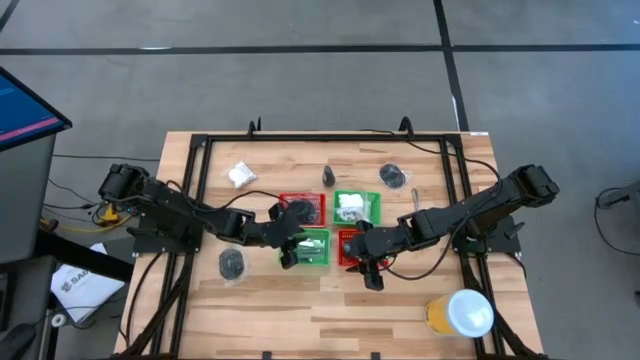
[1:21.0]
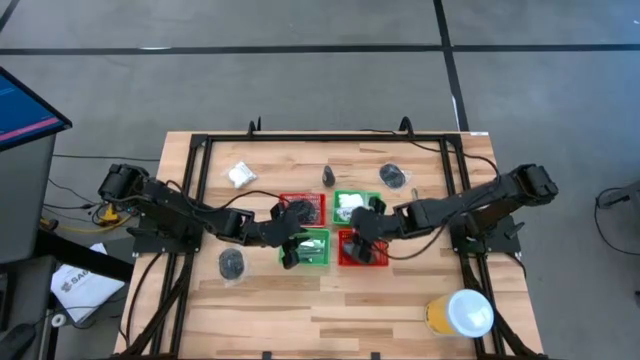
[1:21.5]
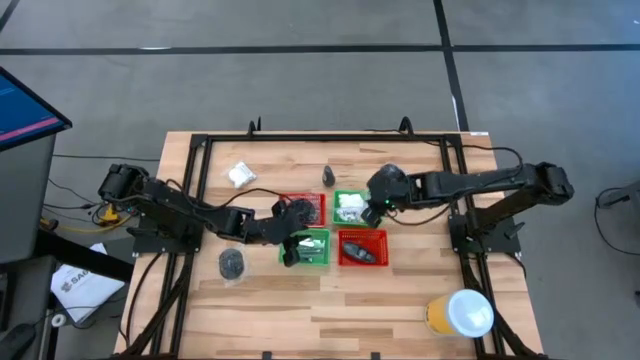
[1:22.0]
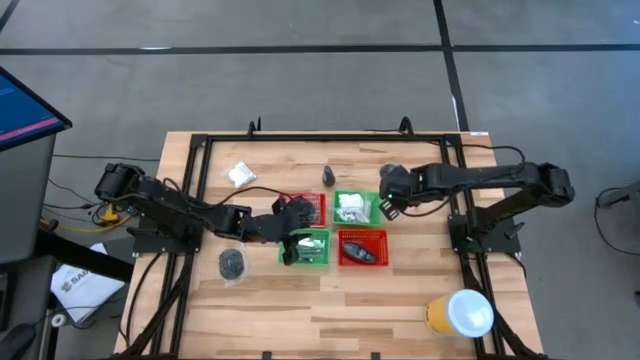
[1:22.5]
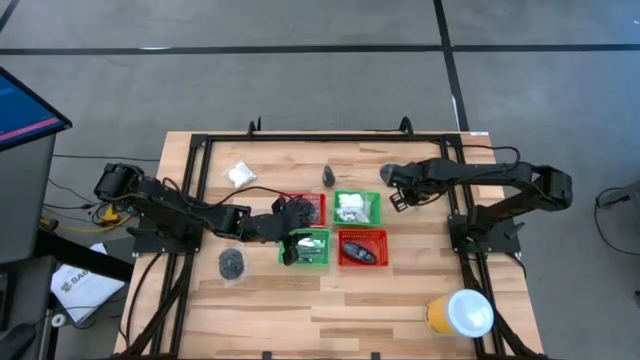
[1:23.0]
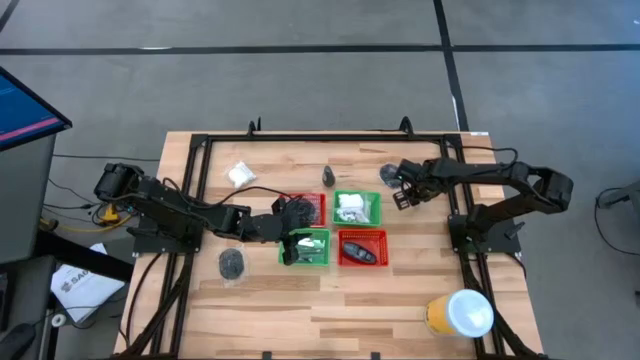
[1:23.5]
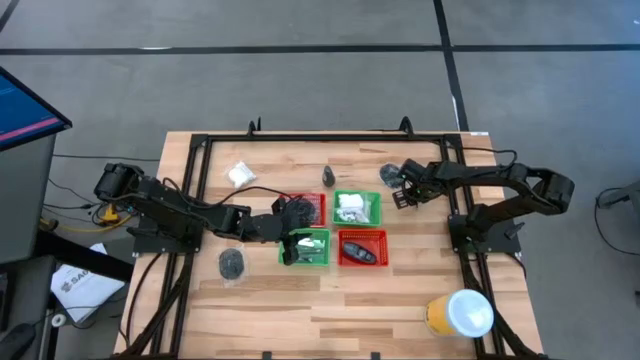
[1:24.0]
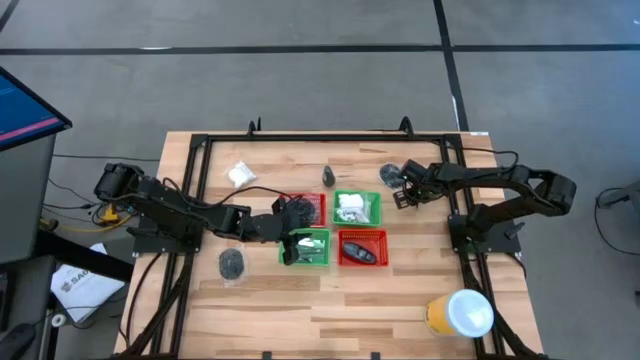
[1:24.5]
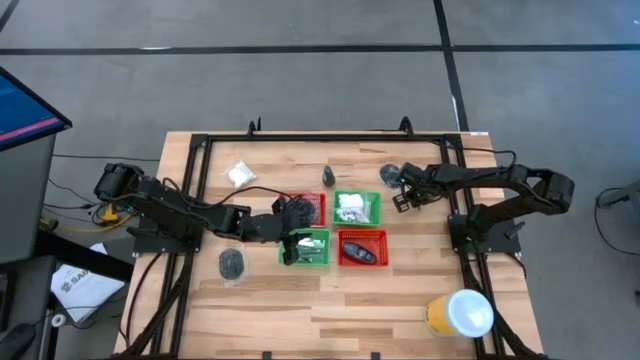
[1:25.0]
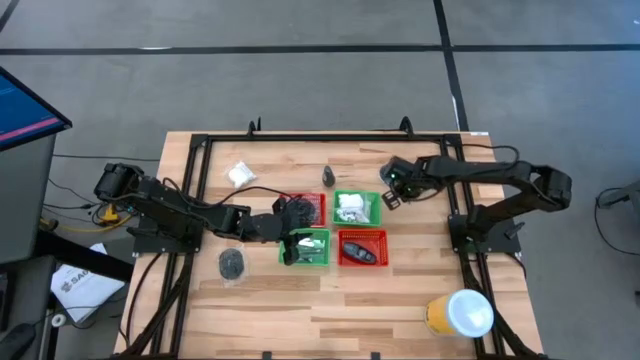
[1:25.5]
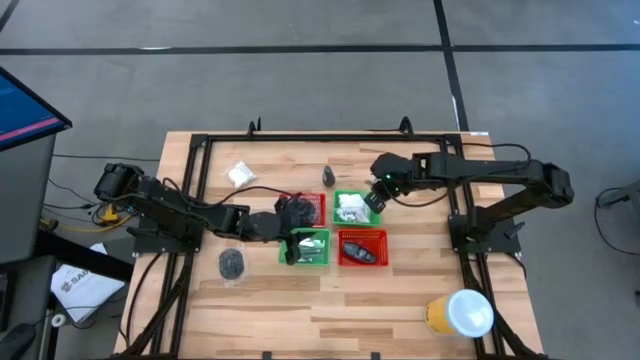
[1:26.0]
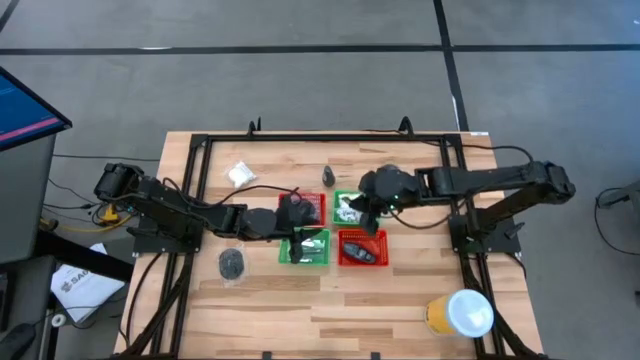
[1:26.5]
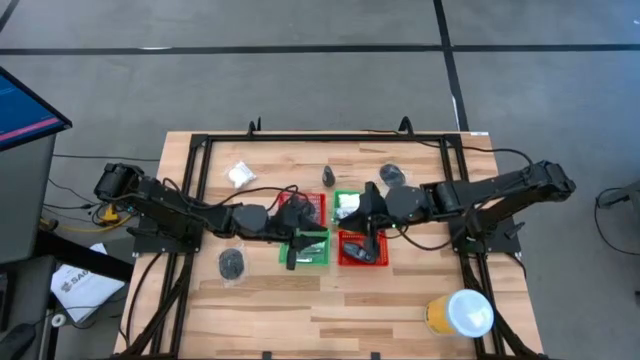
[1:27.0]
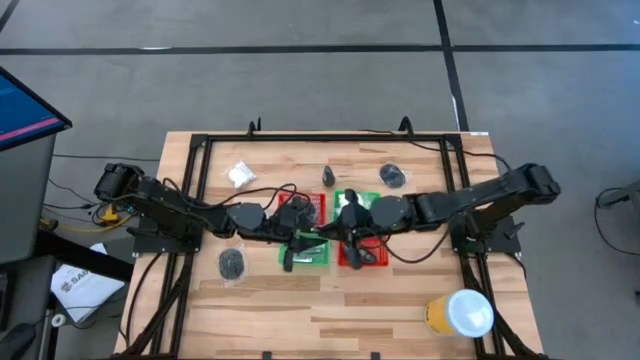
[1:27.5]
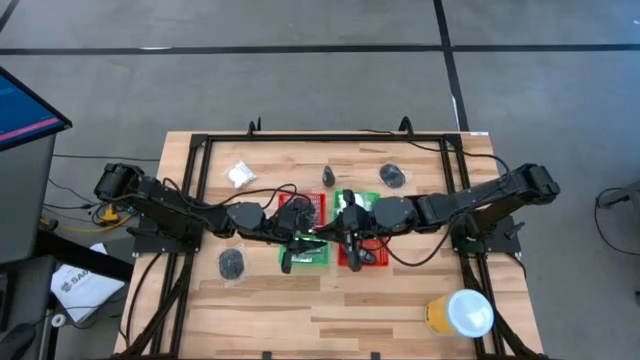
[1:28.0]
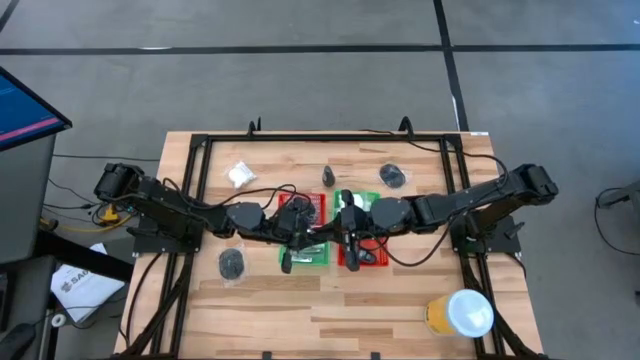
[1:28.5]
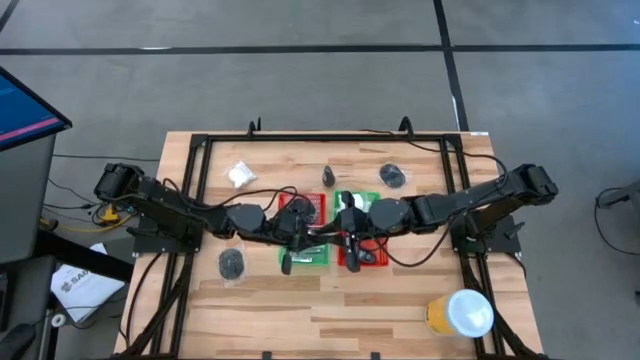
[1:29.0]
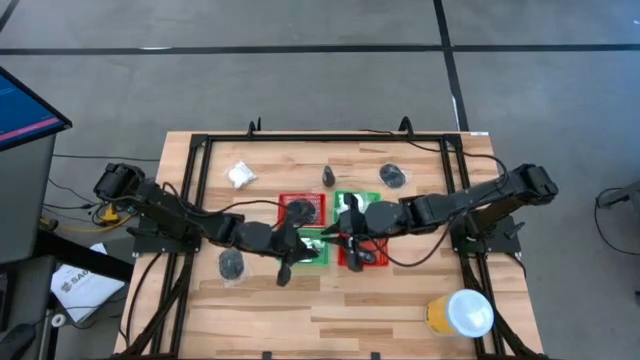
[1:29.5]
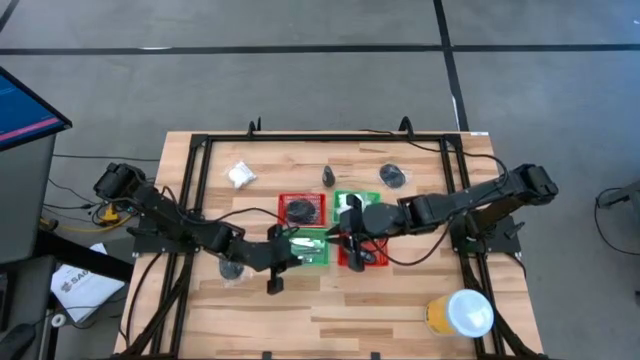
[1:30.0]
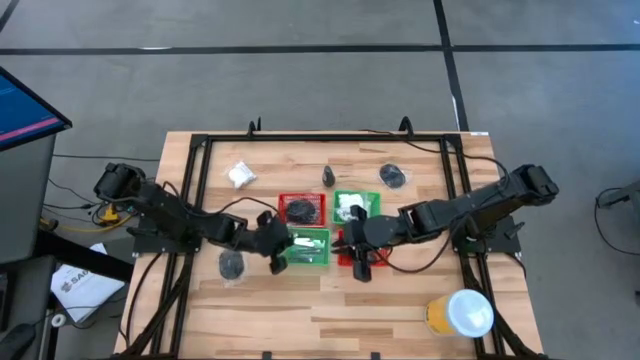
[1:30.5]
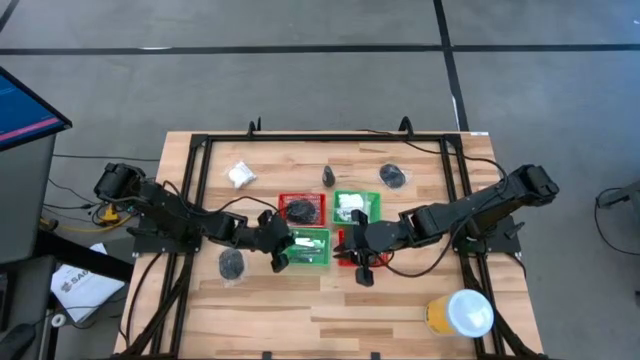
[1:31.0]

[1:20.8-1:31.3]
Task: Pick & Place Travel size toiletries
Put the silver nail cutter into the left green basket

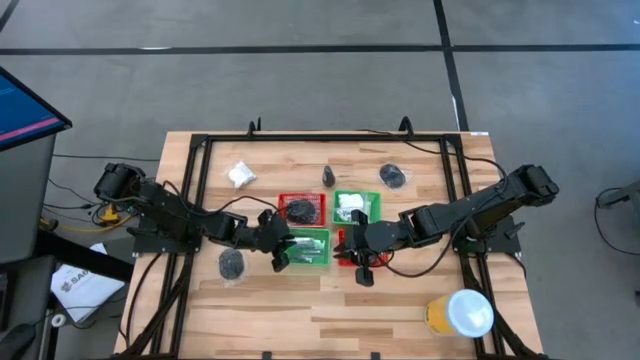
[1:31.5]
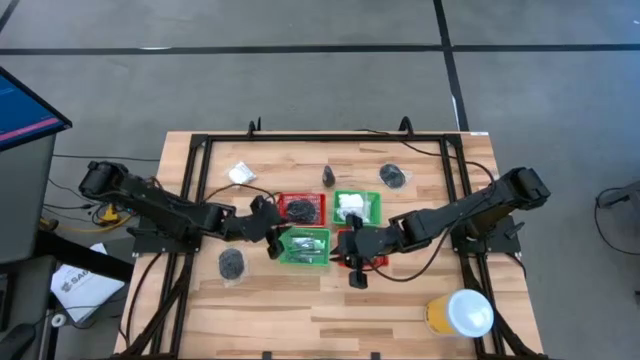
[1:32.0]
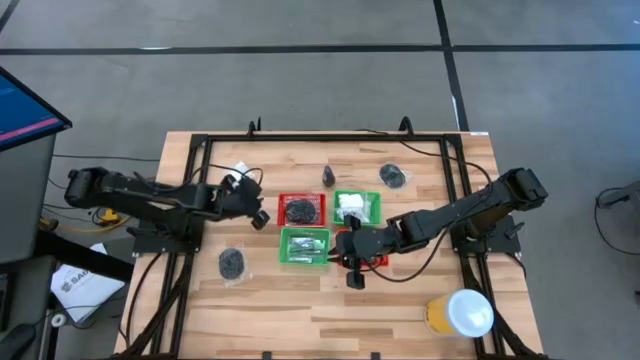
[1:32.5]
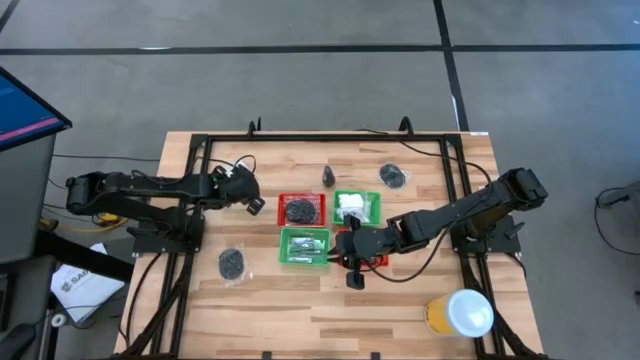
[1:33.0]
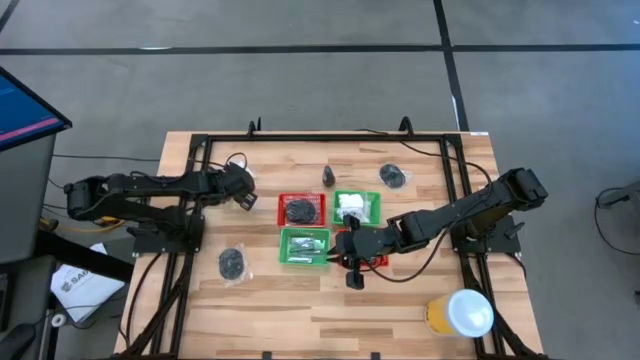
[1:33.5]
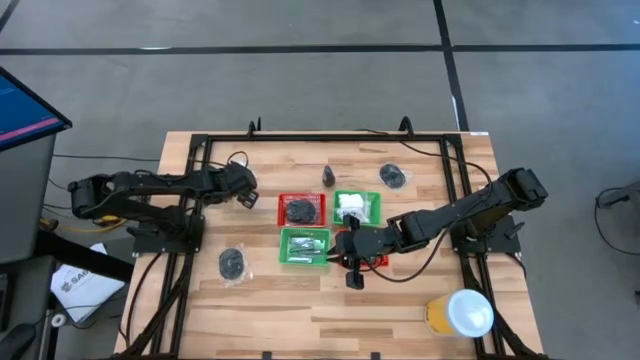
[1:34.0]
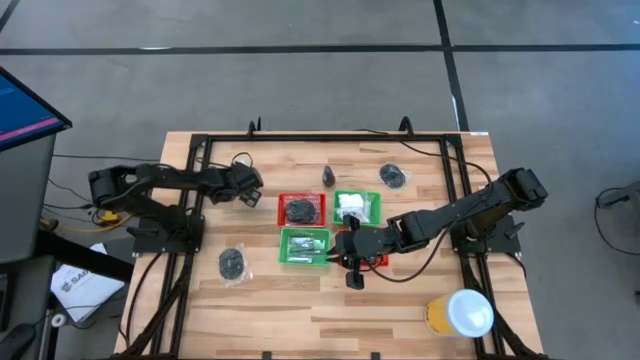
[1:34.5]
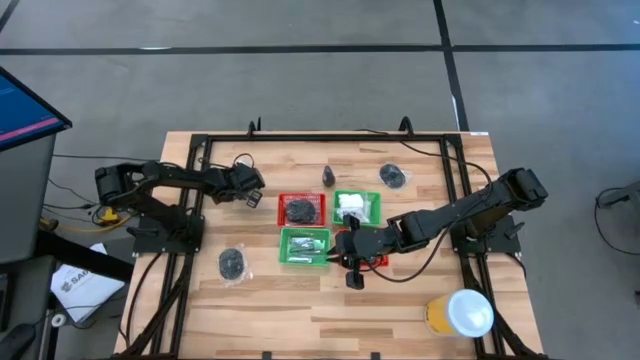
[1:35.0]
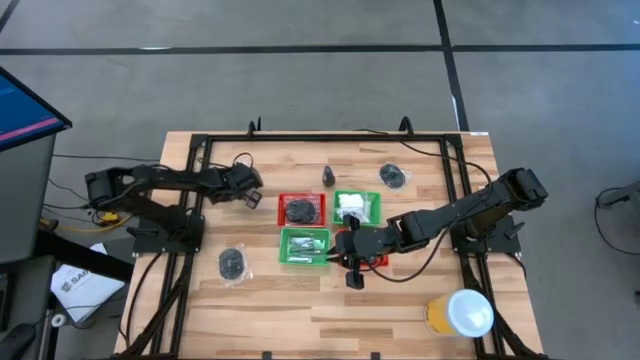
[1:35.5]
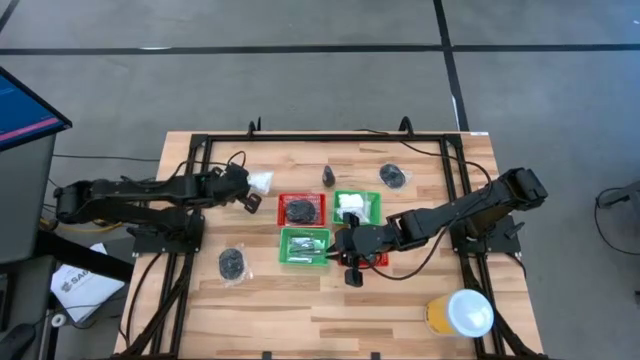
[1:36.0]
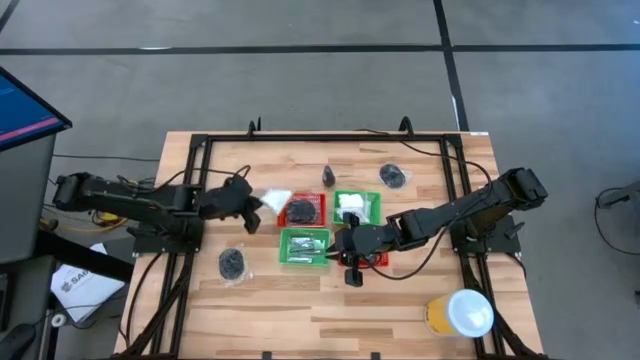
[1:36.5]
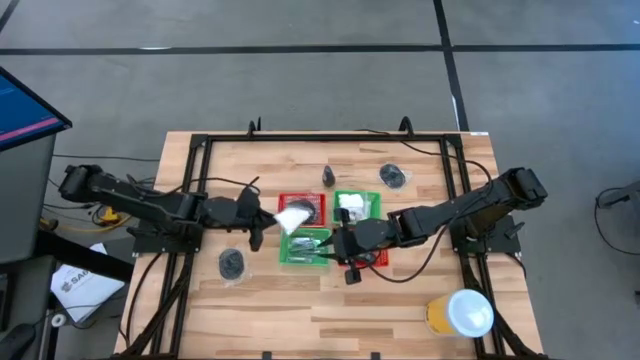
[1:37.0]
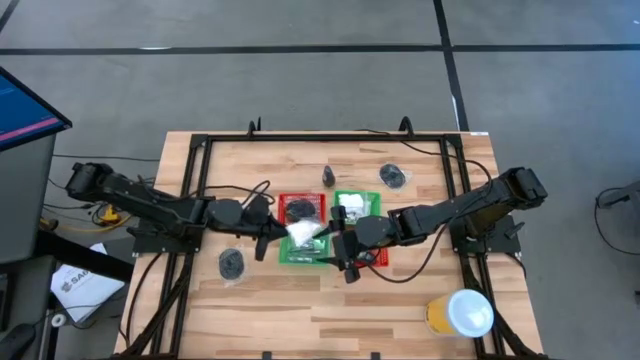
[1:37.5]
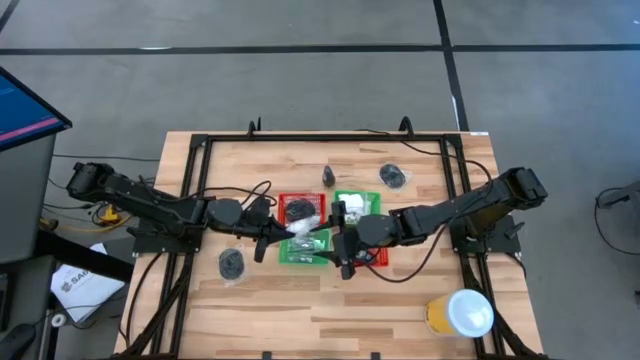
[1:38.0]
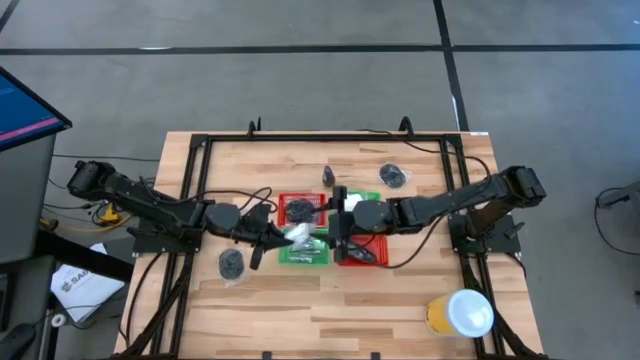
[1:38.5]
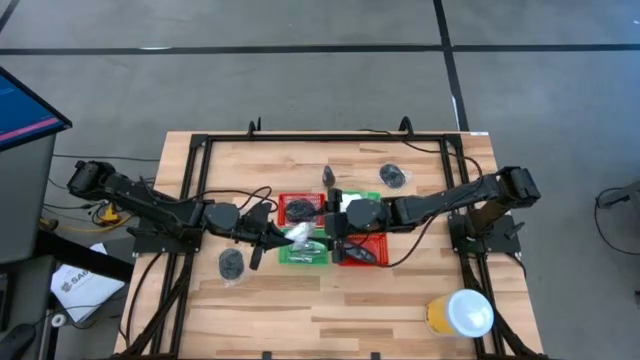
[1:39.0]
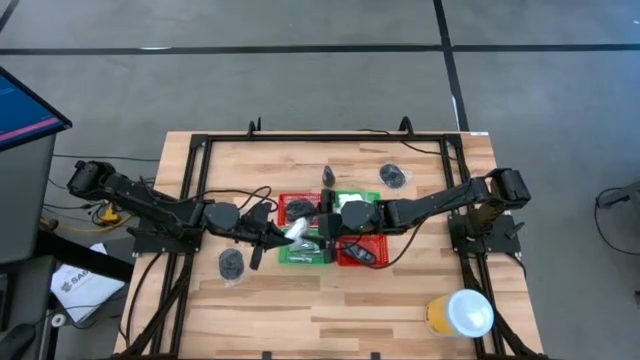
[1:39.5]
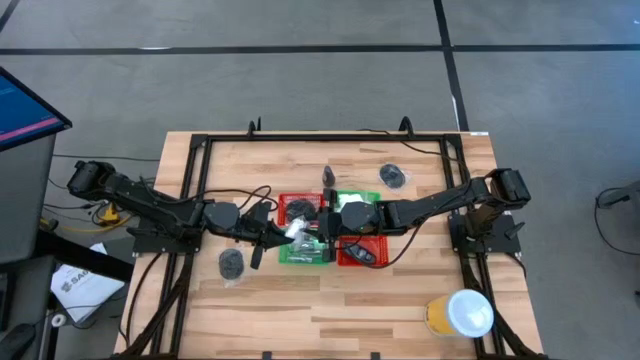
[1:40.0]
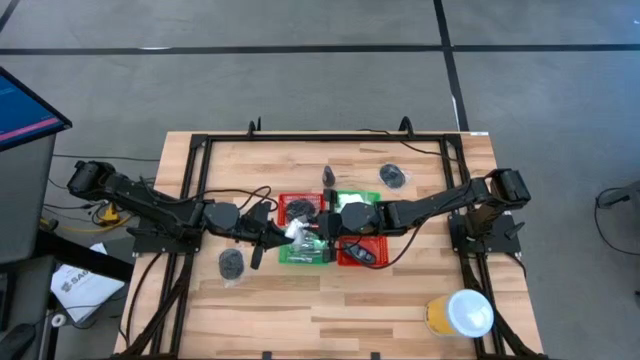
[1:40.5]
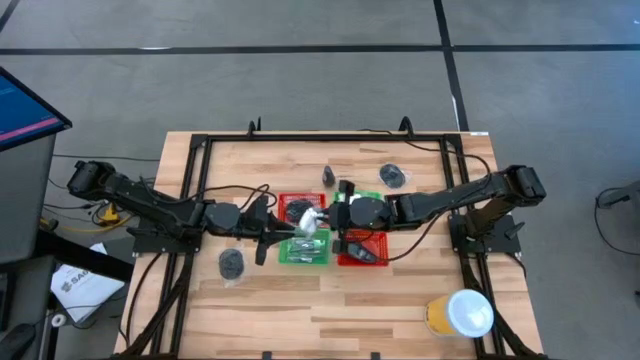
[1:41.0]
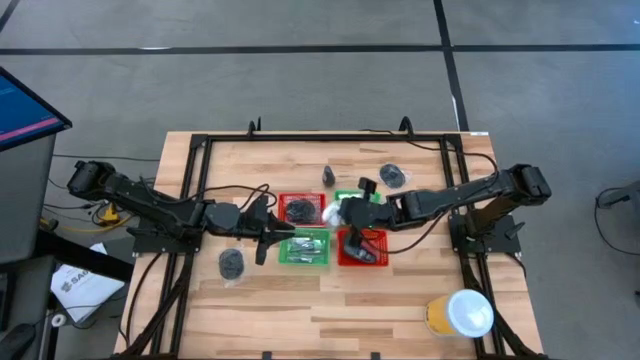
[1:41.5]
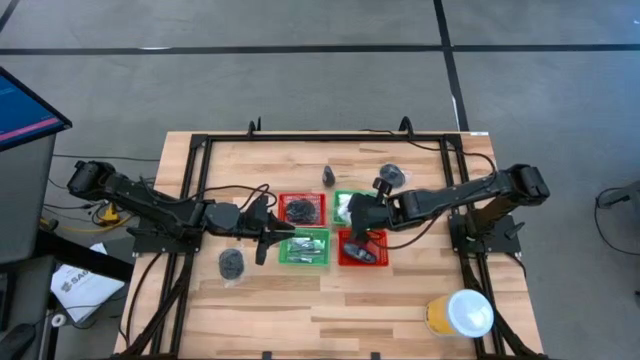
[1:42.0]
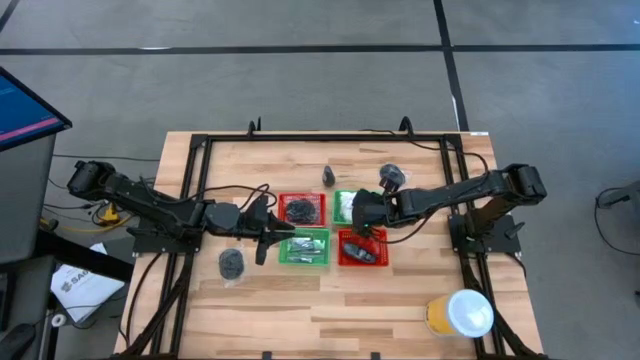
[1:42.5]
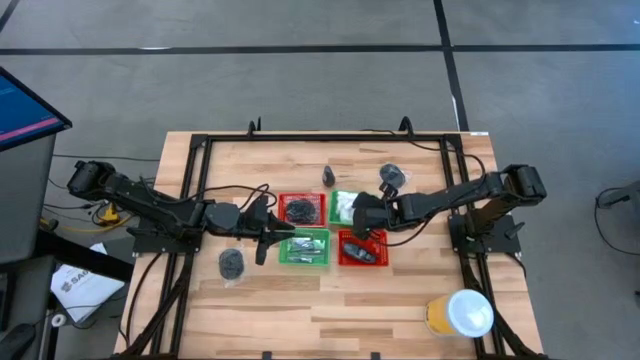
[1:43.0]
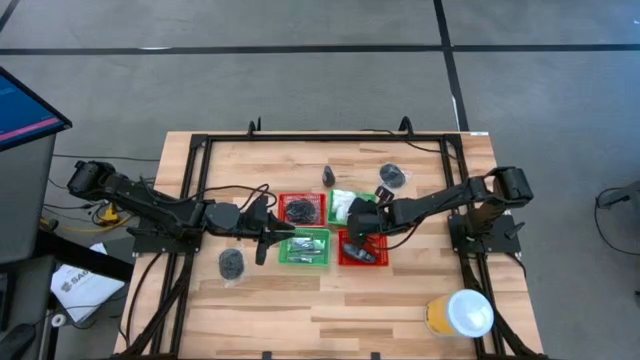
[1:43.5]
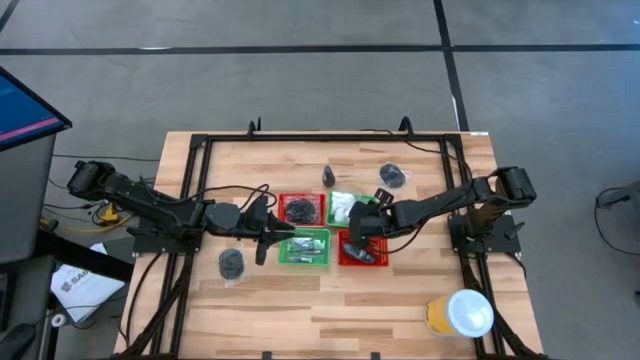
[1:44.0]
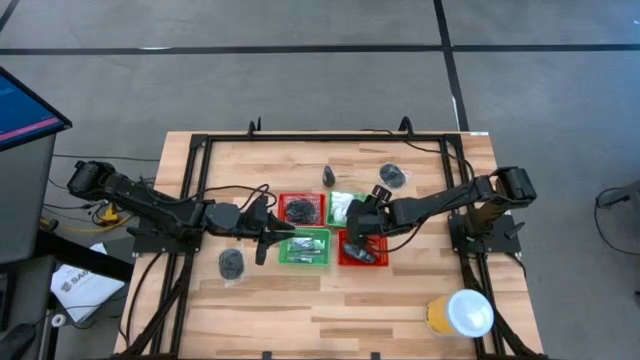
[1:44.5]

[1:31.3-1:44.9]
Put the white cotton pack into the right green basket
